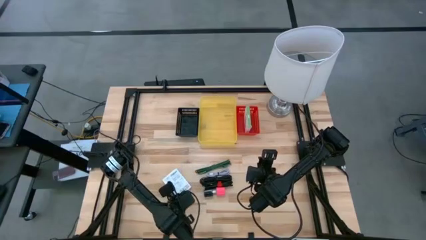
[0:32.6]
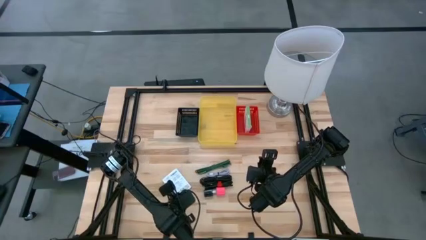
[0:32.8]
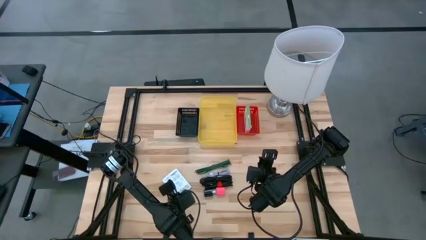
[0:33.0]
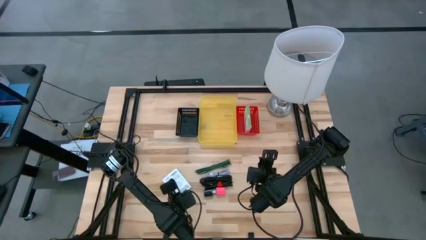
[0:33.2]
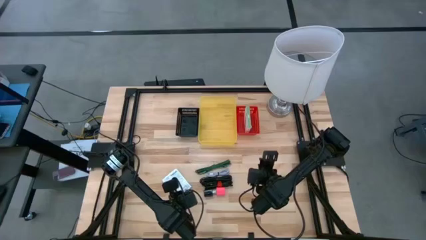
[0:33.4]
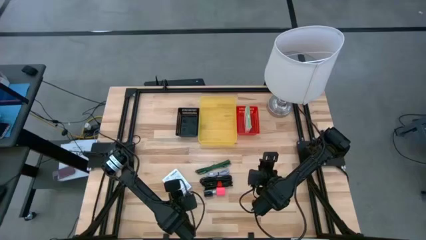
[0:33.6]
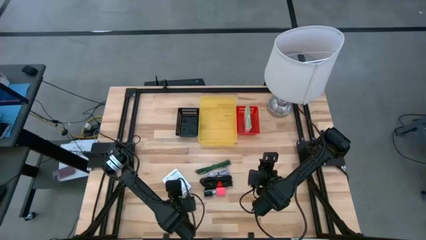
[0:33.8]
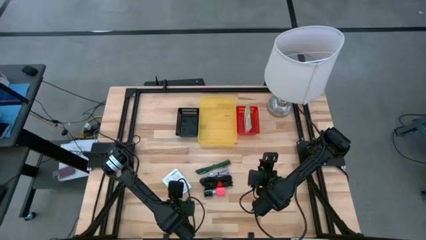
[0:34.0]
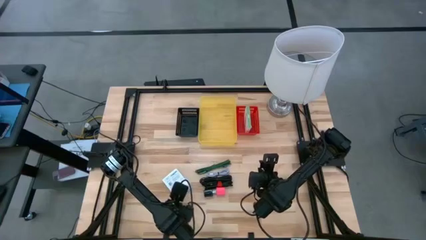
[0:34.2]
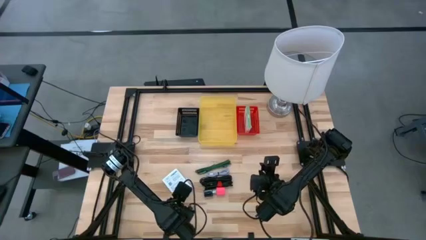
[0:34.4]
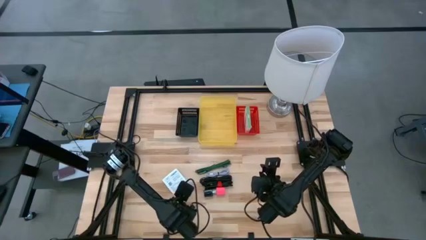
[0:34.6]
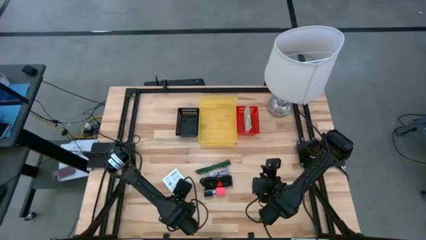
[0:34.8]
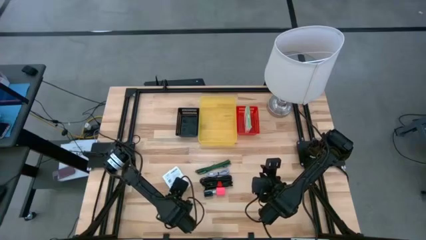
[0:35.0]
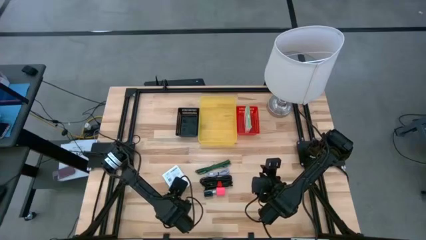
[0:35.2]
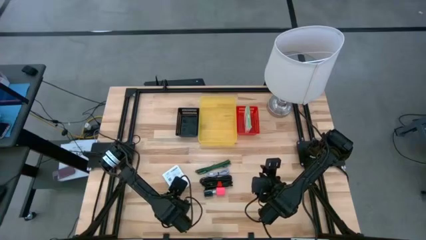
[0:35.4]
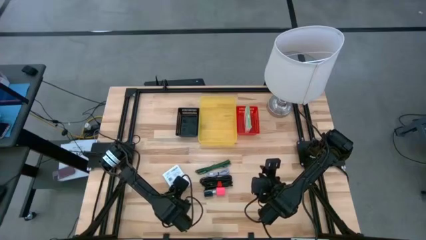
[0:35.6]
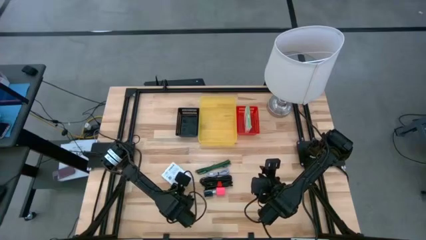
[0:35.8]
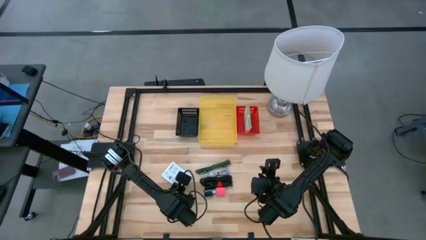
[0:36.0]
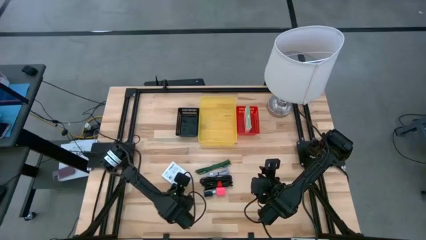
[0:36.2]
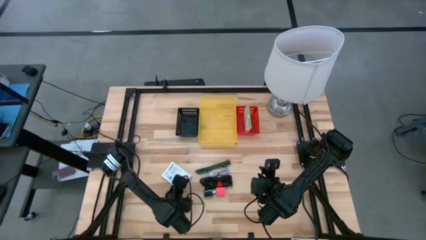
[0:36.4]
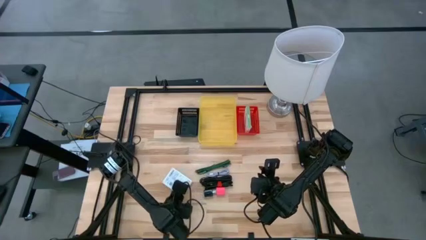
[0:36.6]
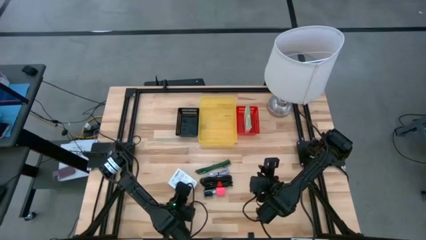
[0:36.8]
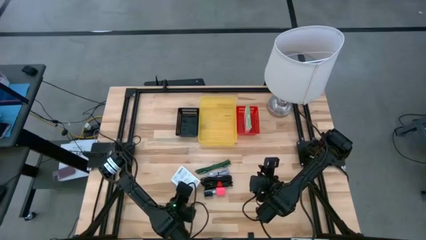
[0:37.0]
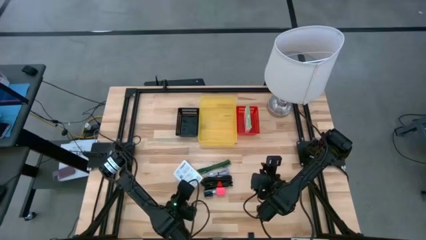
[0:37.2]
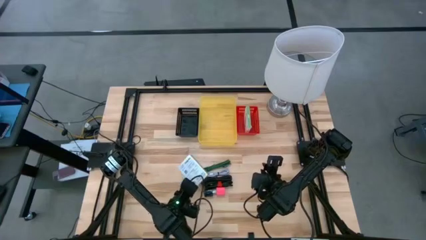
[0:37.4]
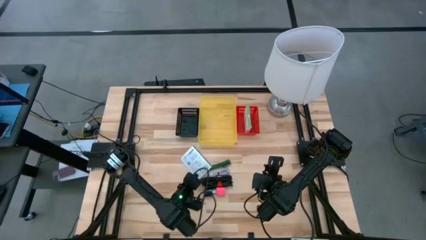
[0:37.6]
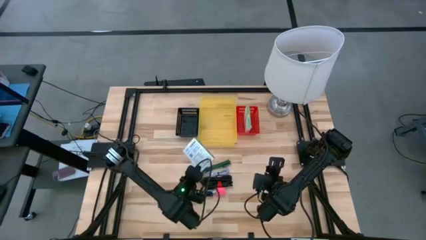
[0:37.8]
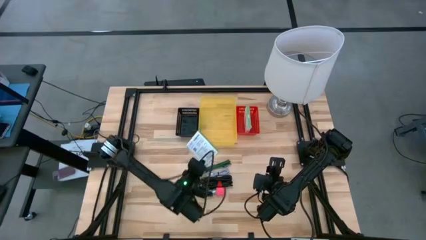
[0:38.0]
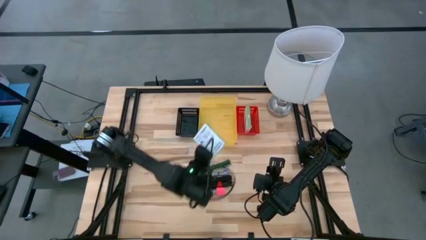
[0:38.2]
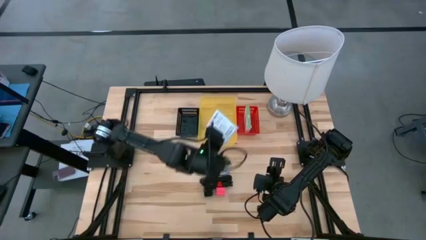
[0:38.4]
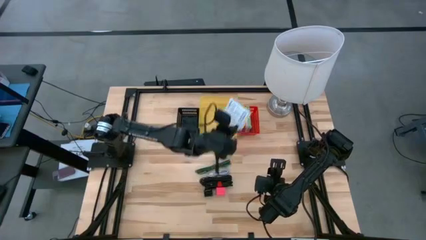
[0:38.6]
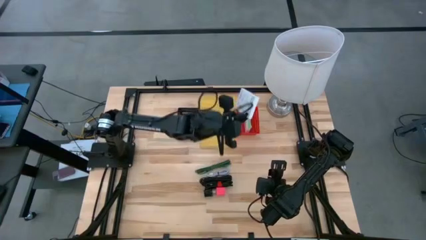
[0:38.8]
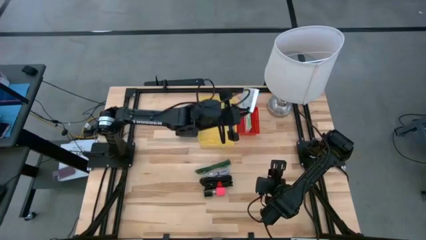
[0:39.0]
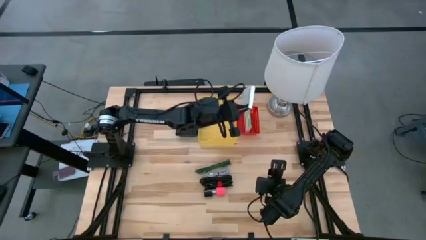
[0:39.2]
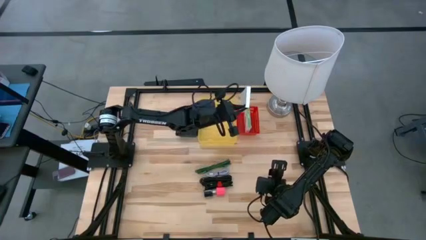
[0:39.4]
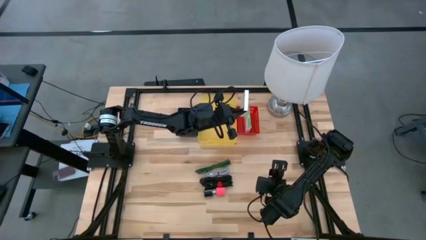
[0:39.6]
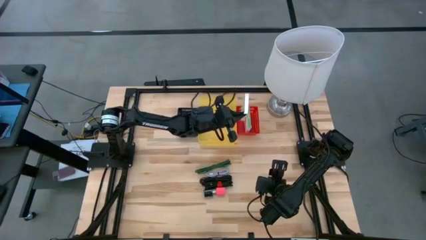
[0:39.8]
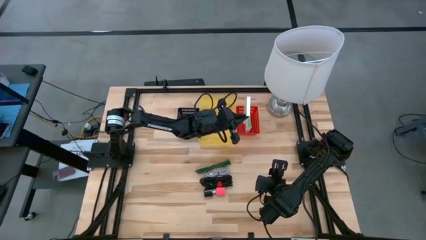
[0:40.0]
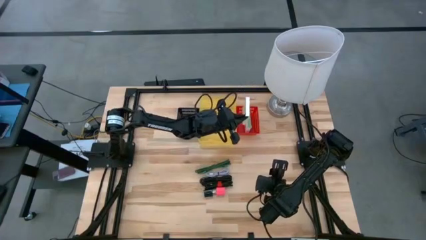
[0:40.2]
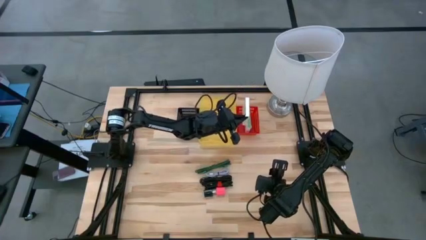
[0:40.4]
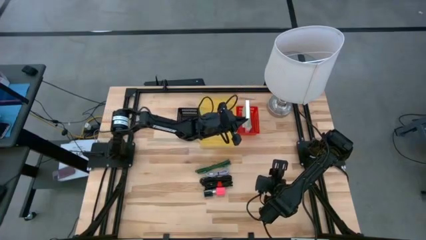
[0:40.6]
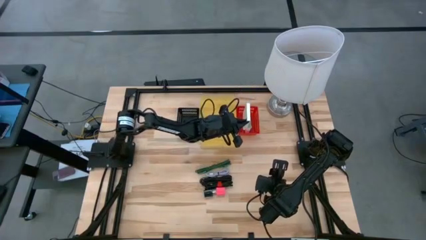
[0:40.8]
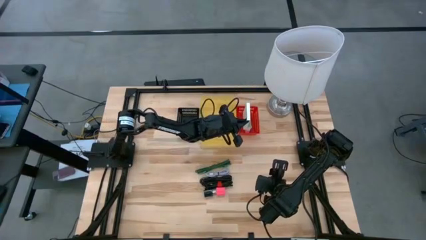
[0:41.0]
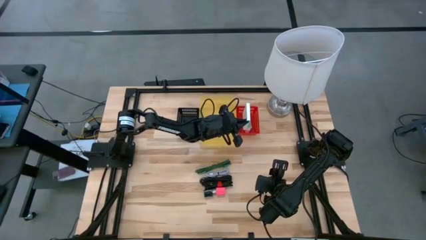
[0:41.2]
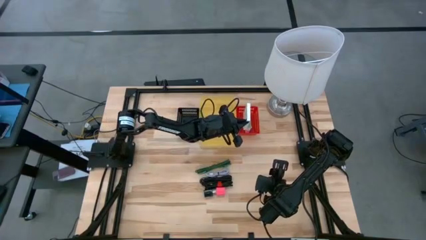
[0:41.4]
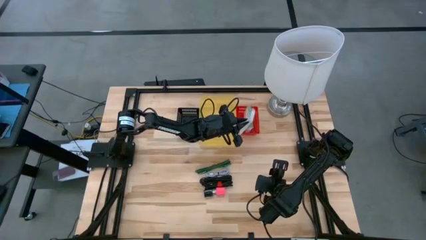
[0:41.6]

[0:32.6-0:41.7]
Task: Pick and place items into bin
Put the white and green card reader box into the red bin

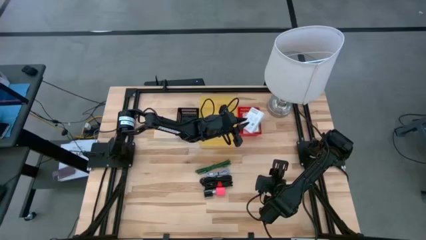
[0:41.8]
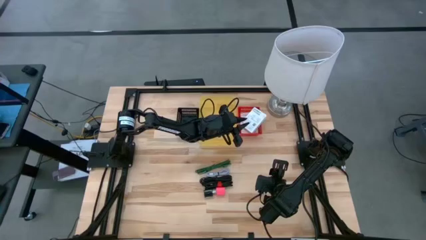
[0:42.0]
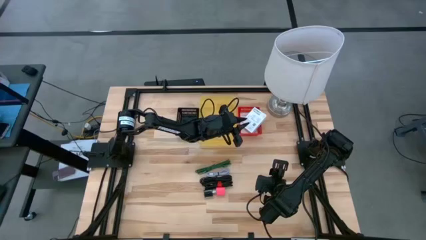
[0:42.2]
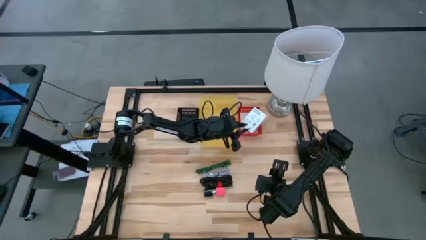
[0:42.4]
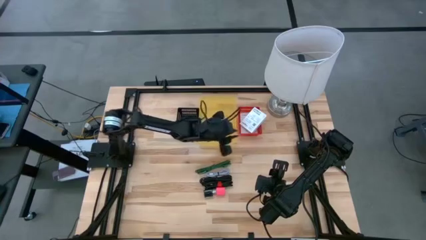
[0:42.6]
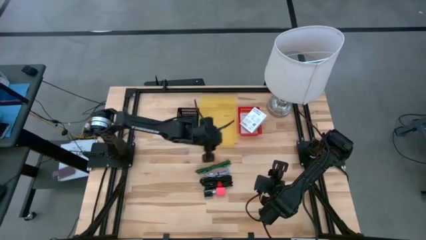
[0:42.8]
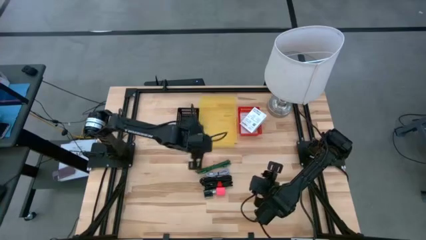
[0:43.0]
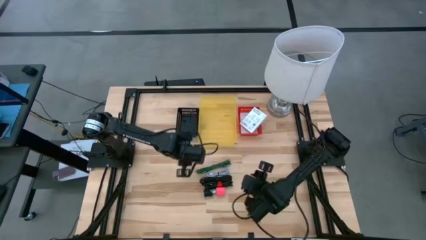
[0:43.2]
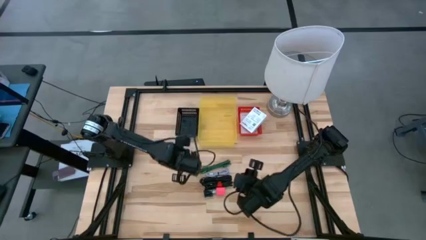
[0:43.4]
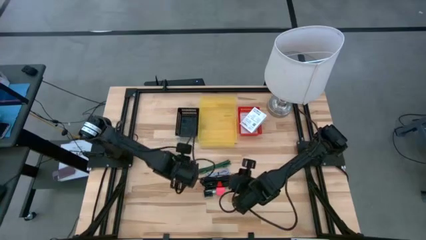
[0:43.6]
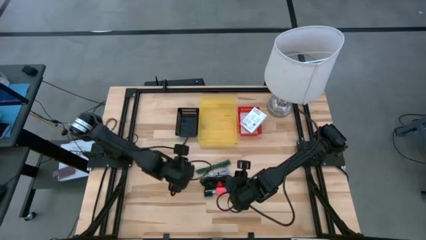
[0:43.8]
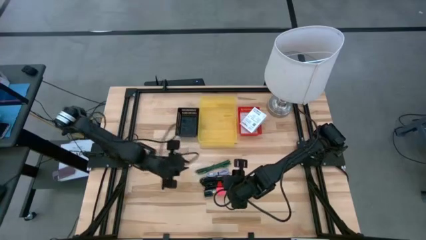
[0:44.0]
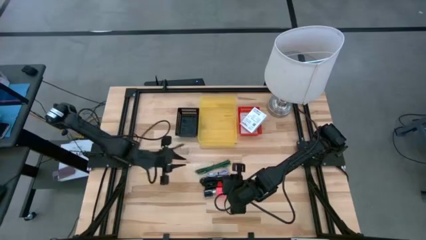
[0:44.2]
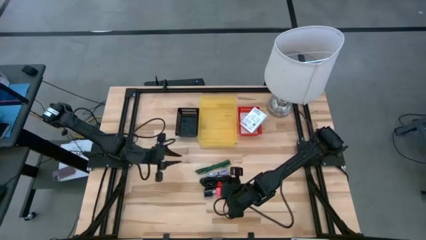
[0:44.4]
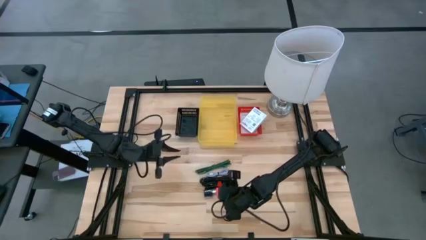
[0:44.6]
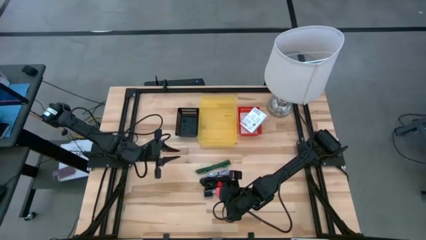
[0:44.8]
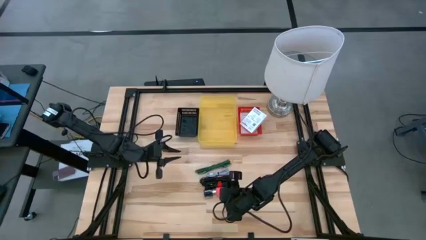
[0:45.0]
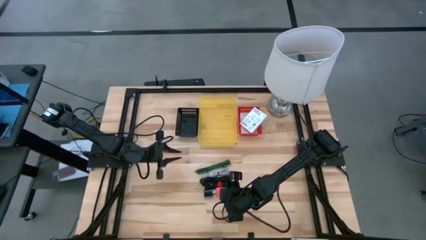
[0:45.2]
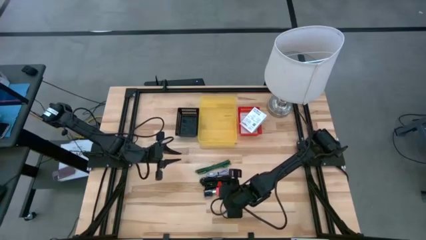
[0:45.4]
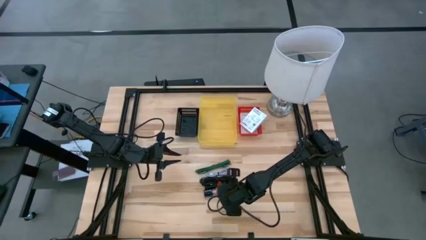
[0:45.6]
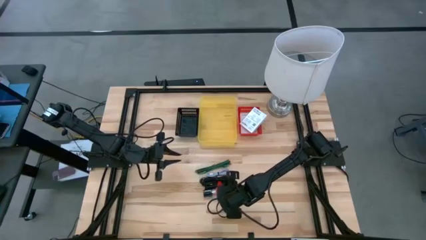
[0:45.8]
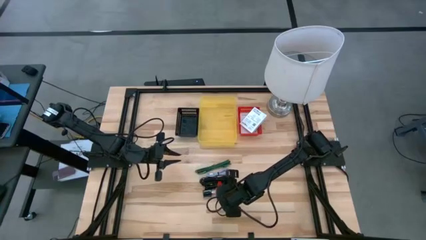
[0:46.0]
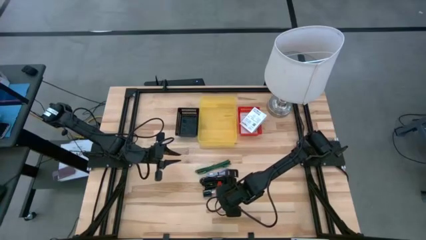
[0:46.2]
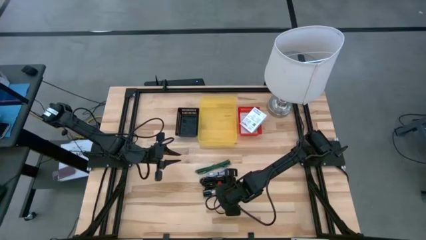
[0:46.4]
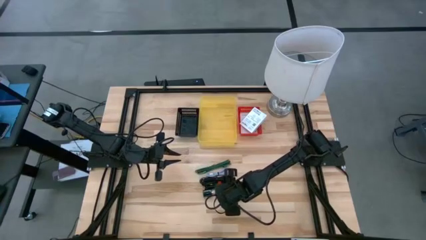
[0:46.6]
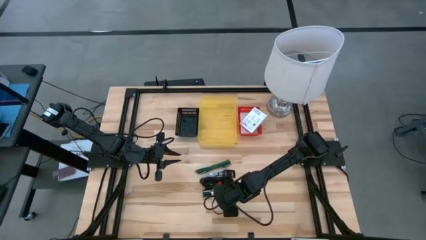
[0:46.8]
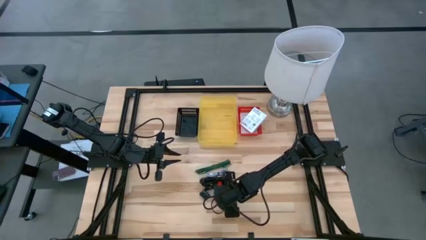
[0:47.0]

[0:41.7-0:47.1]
Put the pink charger adapter into the black bin
